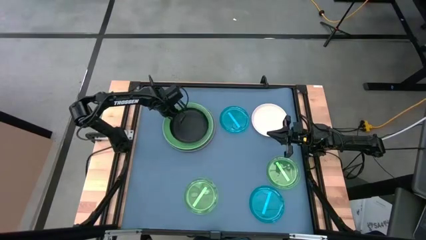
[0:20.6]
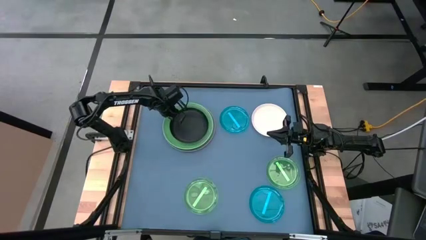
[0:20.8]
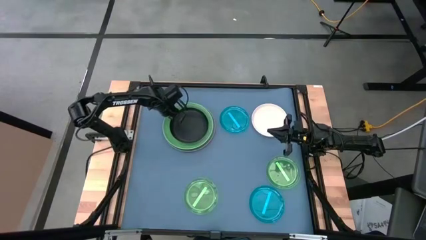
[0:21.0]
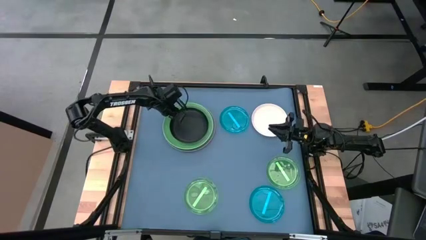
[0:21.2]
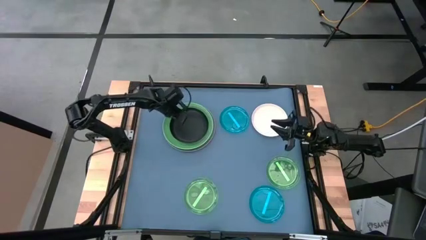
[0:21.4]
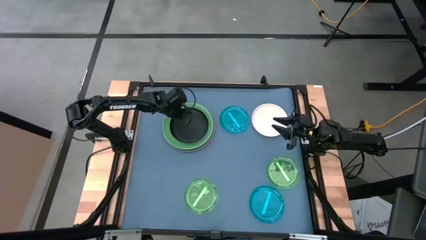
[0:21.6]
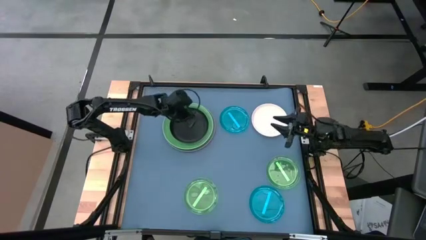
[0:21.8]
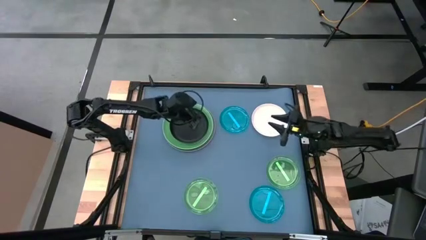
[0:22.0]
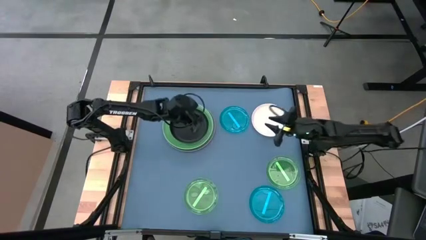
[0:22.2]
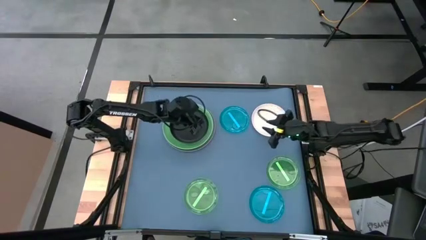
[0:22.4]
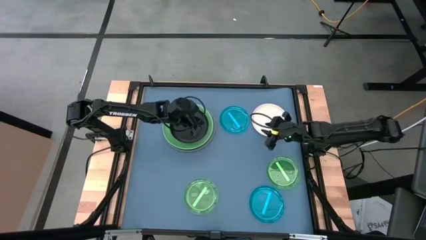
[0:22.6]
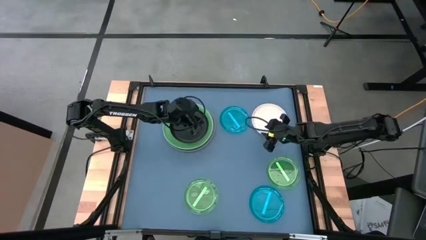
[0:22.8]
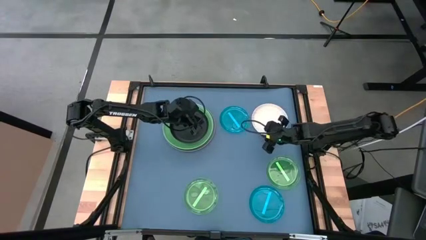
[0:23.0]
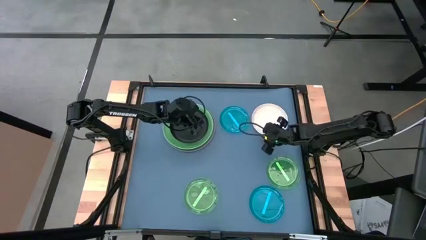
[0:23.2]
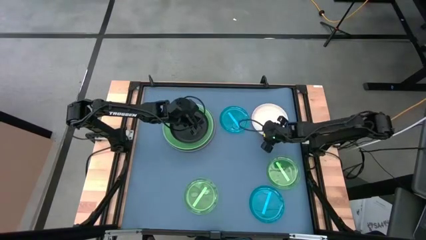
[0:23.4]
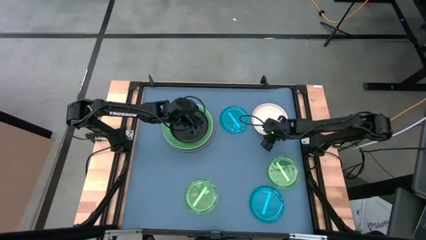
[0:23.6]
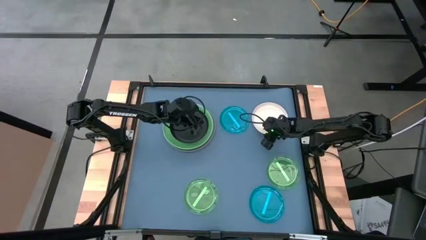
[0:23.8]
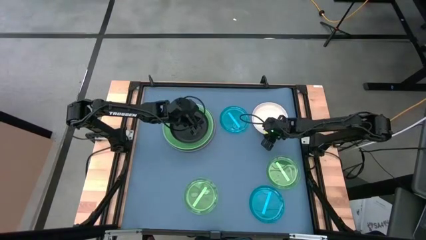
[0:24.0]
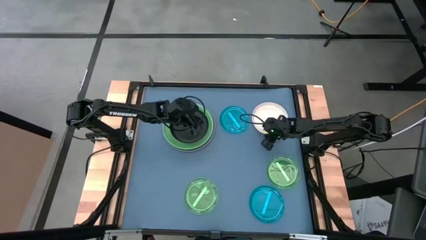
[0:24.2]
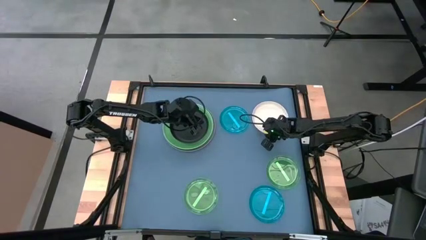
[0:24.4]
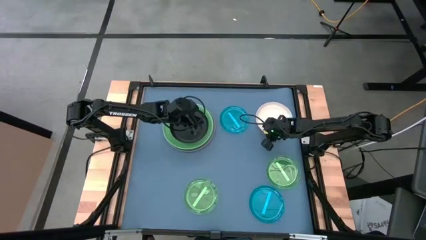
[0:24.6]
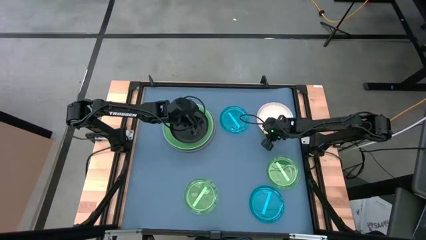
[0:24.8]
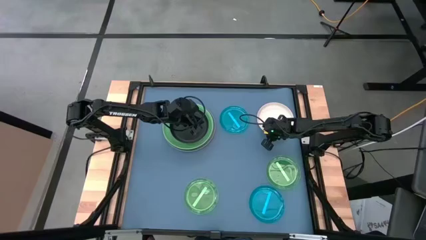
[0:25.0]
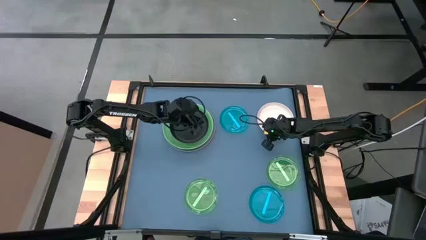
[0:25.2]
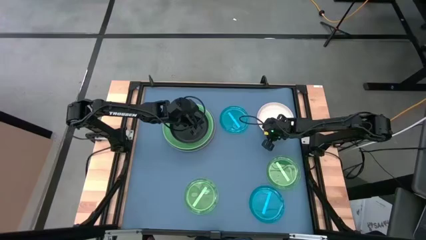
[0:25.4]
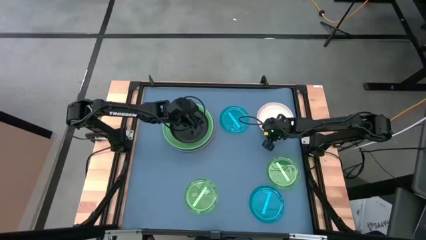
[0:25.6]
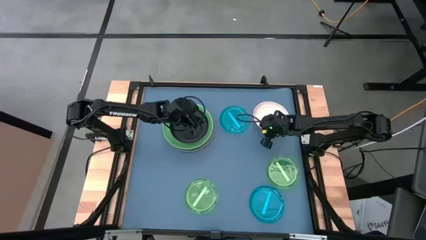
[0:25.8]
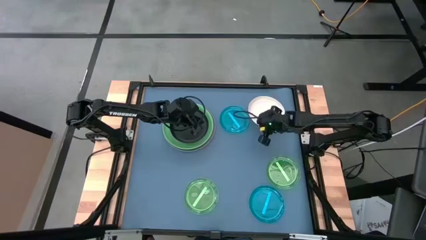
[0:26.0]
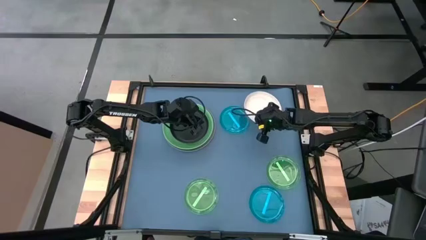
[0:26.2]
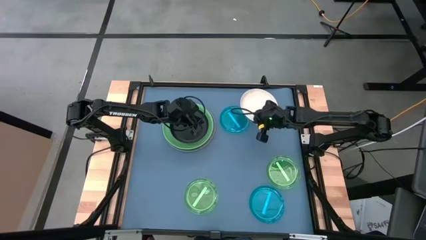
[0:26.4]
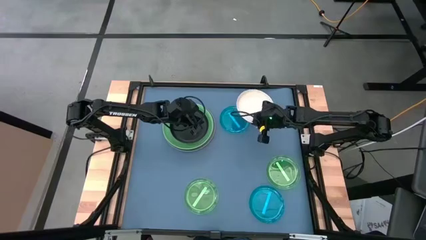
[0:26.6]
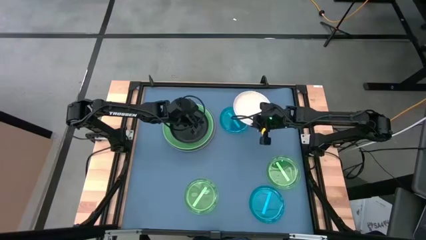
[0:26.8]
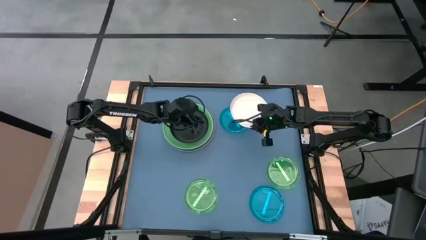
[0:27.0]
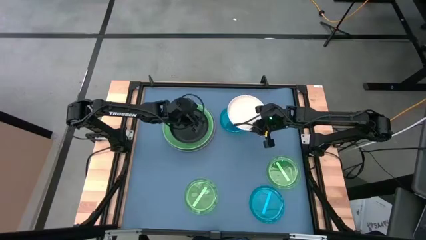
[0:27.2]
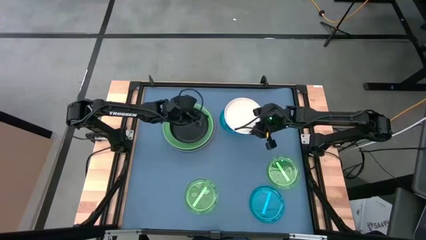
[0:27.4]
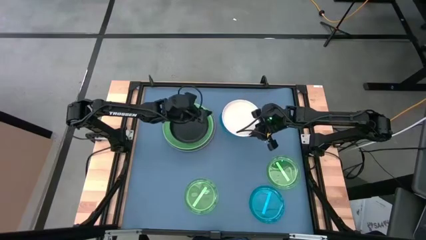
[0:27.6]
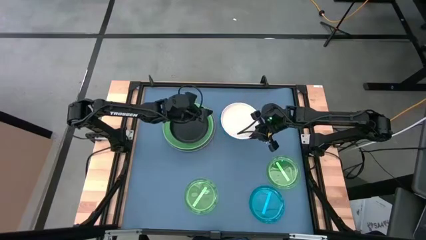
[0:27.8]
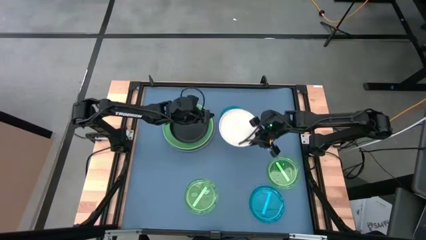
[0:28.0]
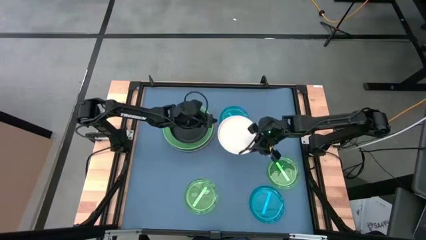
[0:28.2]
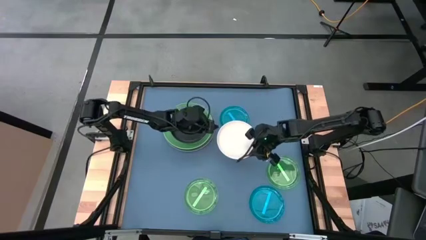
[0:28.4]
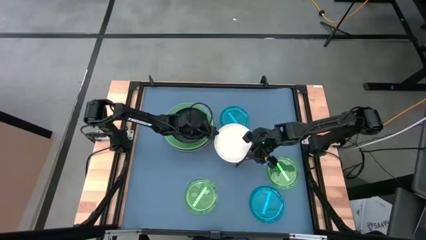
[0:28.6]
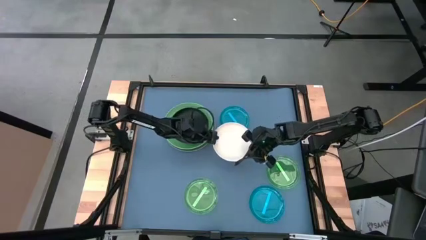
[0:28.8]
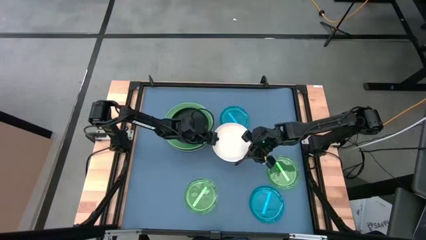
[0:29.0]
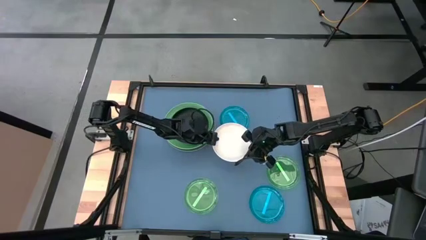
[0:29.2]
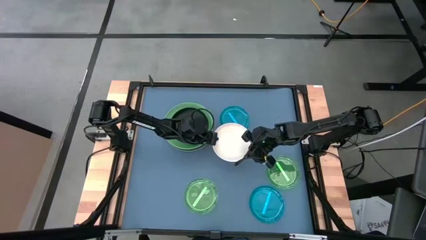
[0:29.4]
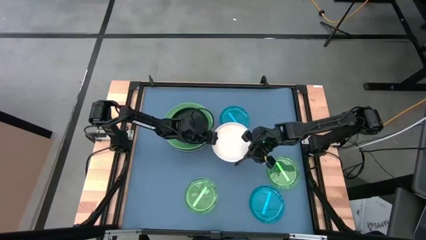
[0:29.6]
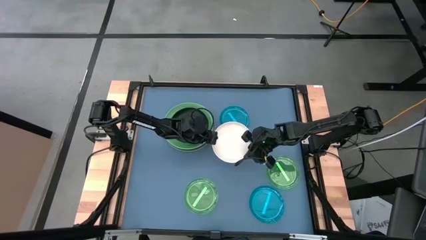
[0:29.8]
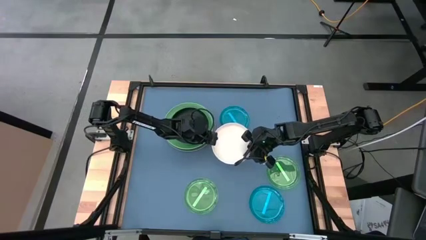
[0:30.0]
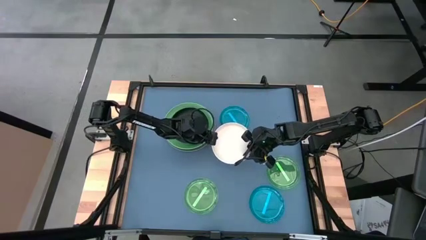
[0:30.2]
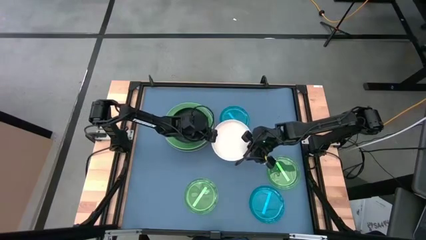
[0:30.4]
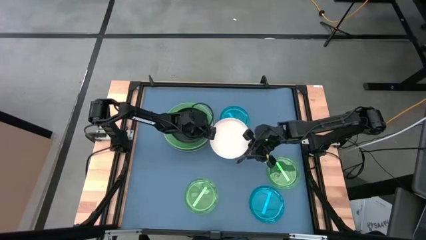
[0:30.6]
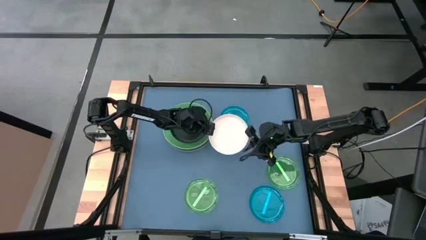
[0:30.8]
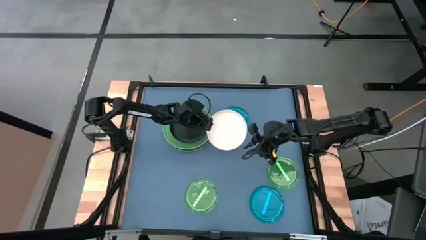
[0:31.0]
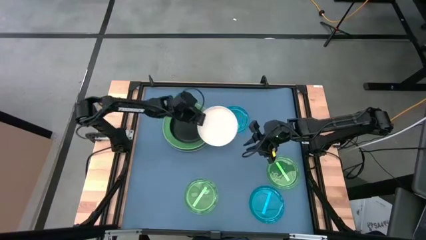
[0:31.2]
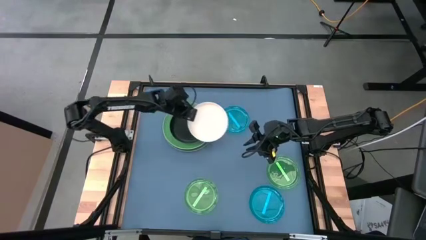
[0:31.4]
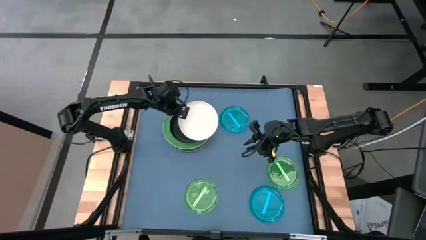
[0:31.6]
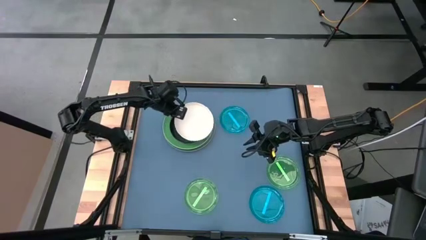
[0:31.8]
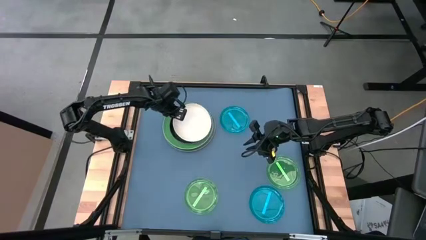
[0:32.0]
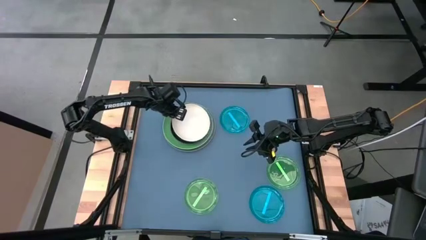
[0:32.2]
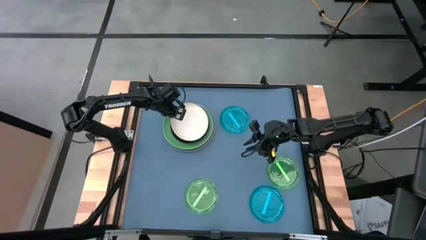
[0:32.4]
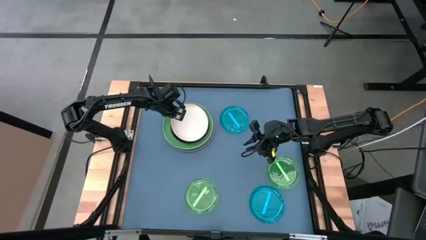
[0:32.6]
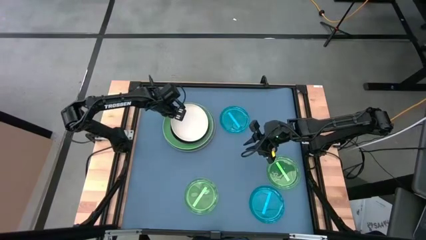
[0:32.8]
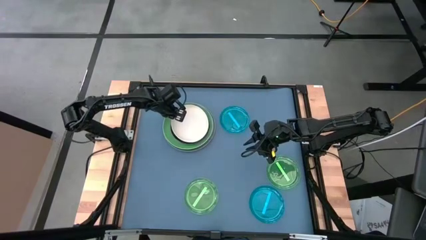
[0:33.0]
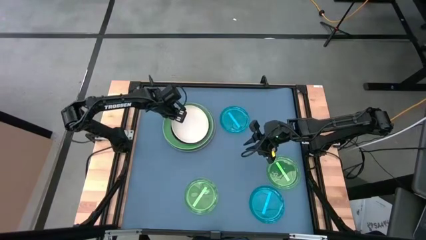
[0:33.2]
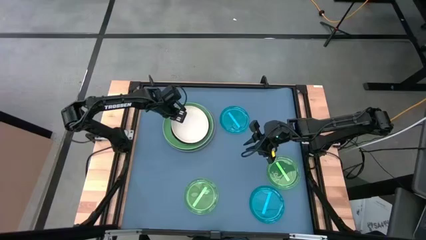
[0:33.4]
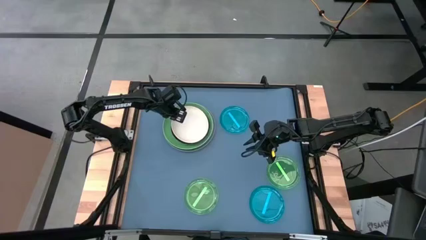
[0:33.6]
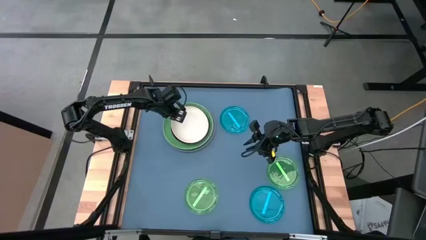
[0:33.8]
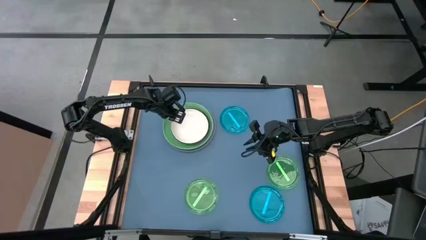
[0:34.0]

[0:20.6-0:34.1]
Task: Stack plastic plates
Stack the white plate on top of the black plate
